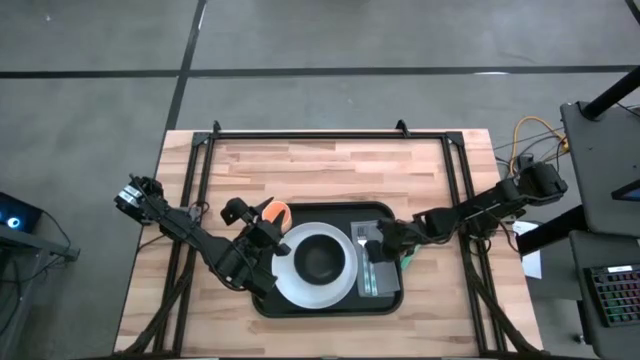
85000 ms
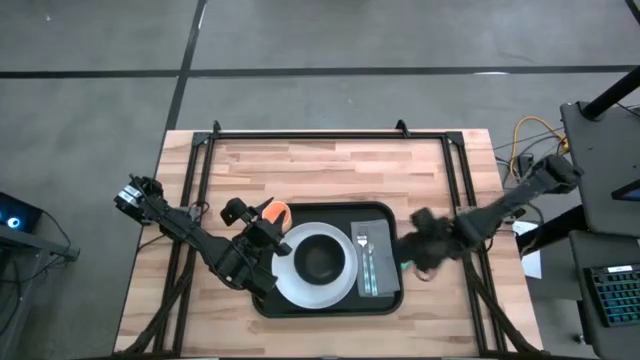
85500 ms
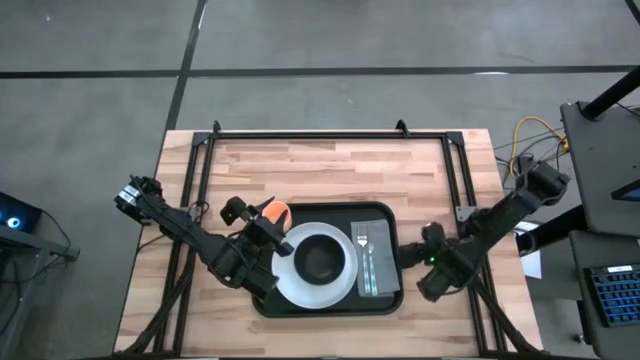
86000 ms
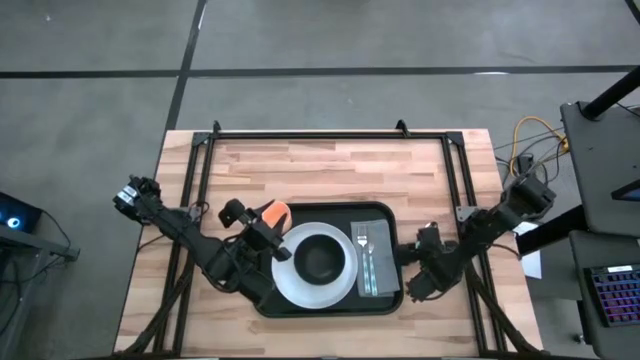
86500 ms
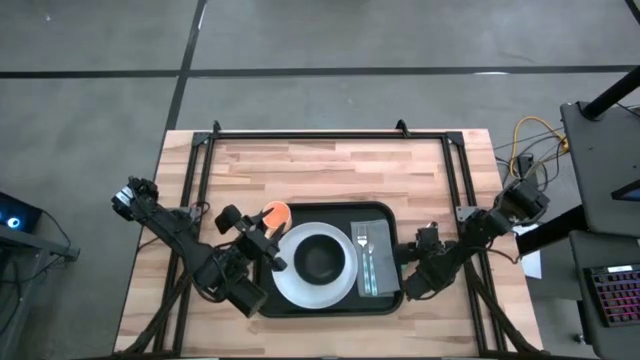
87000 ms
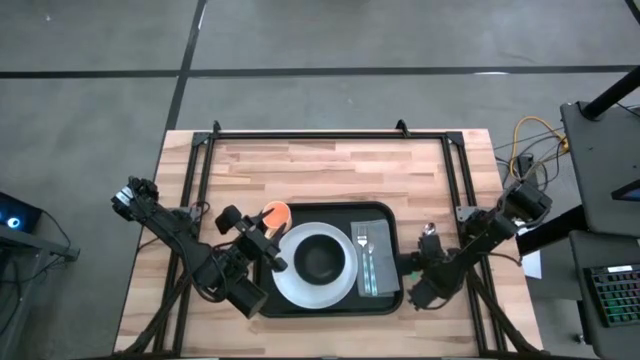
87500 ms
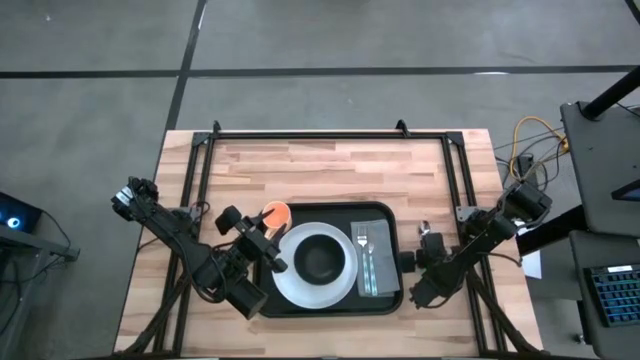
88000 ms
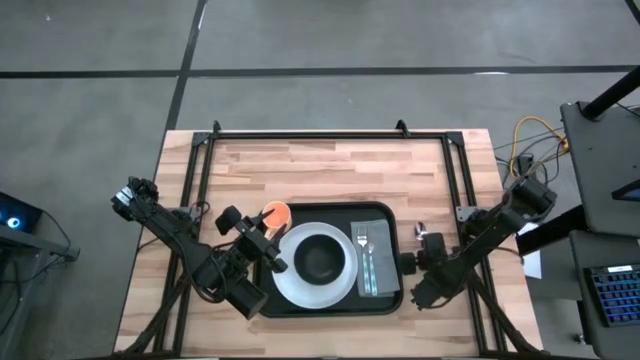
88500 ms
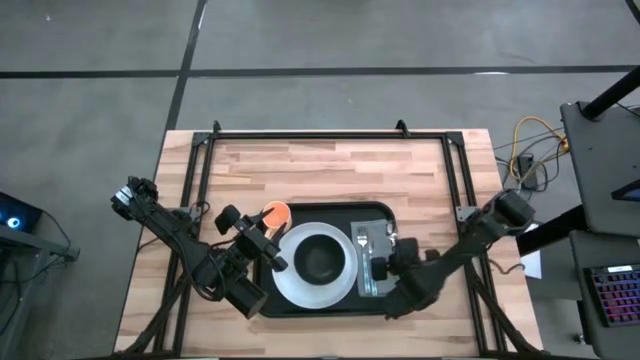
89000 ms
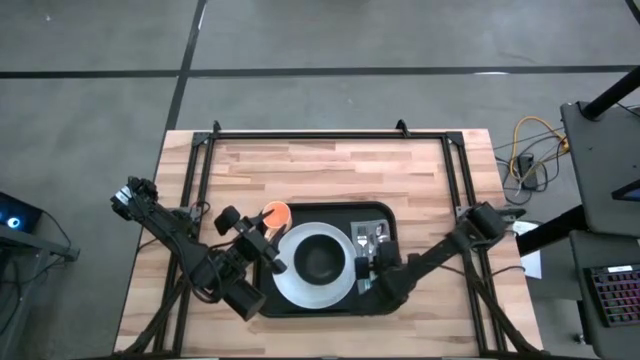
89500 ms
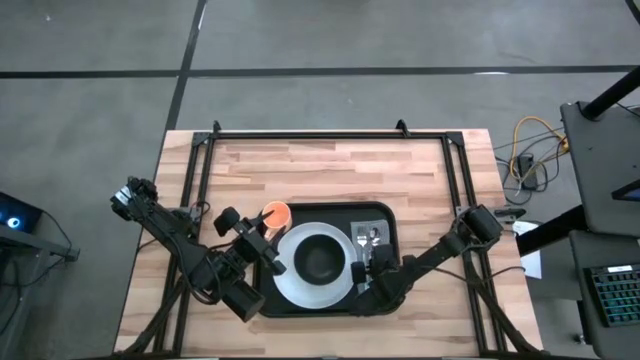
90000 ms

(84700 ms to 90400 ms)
Task: Set up tray
Put the green spoon to the right of the green knife on the gray napkin

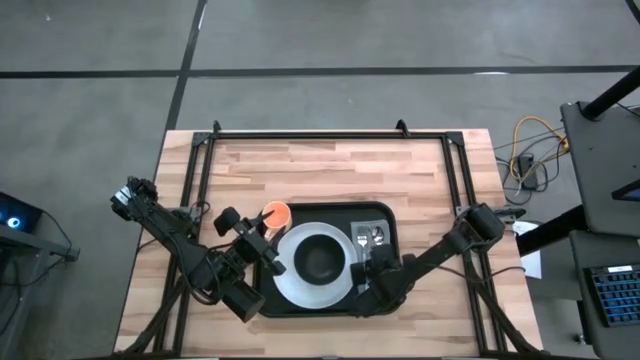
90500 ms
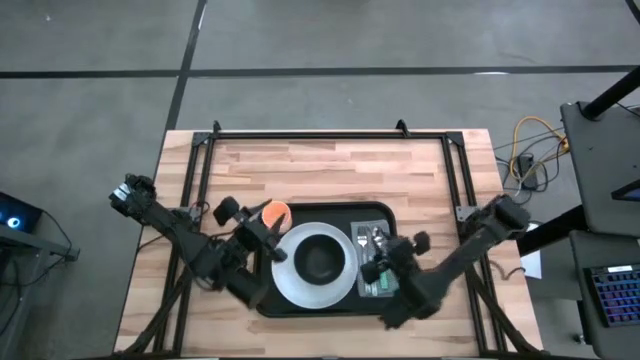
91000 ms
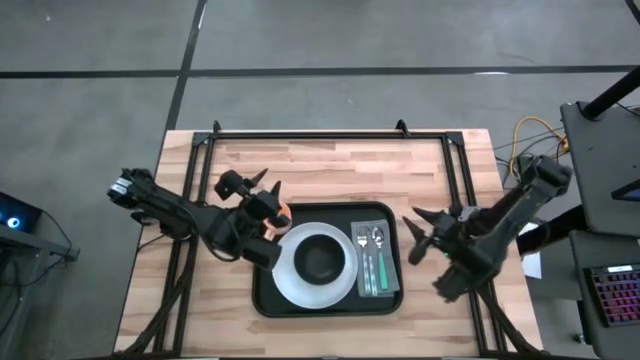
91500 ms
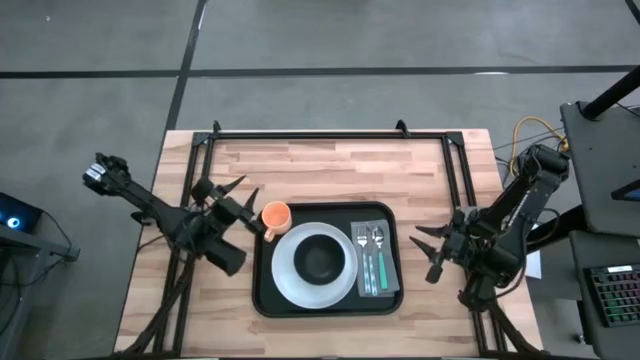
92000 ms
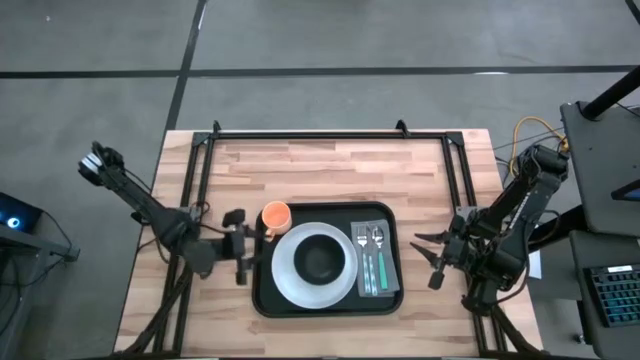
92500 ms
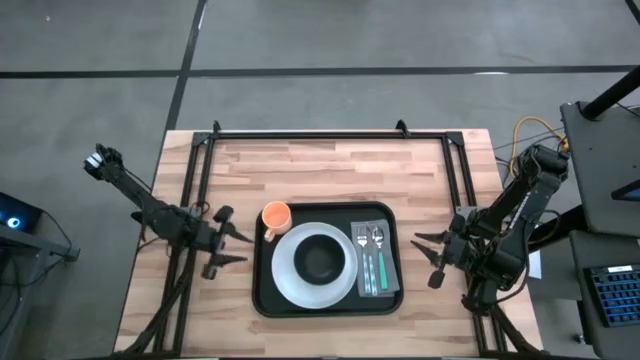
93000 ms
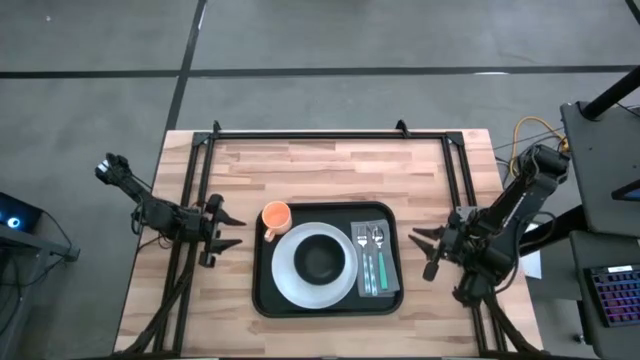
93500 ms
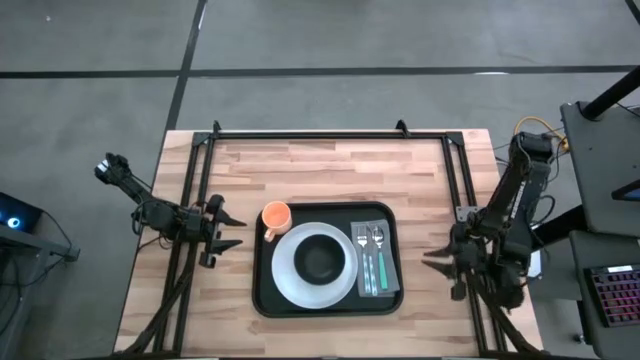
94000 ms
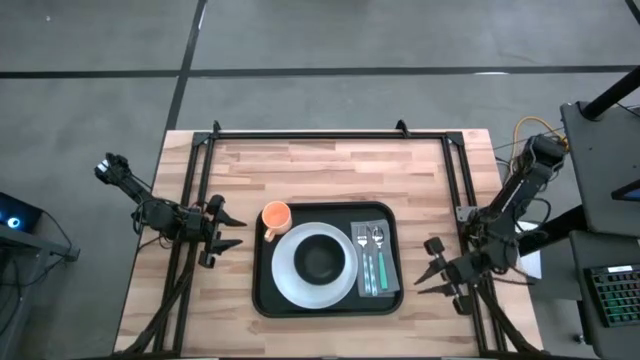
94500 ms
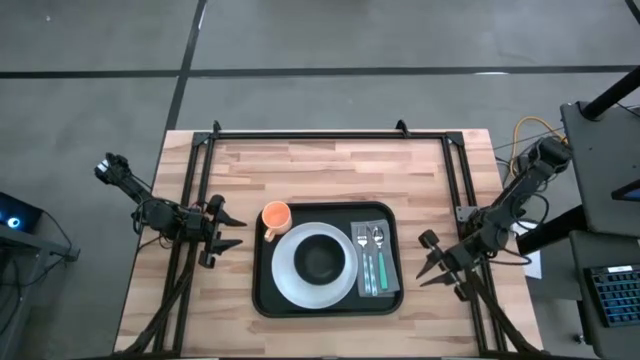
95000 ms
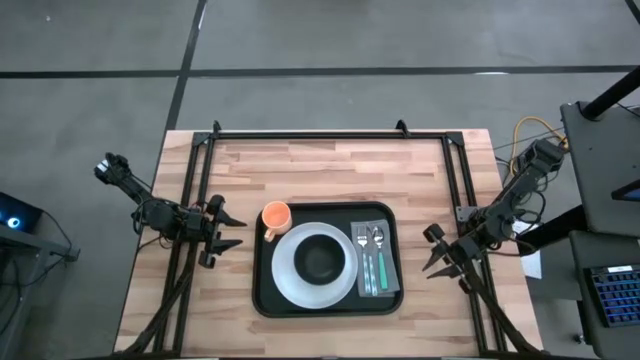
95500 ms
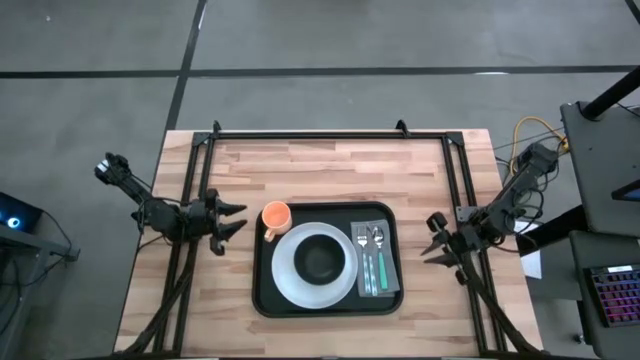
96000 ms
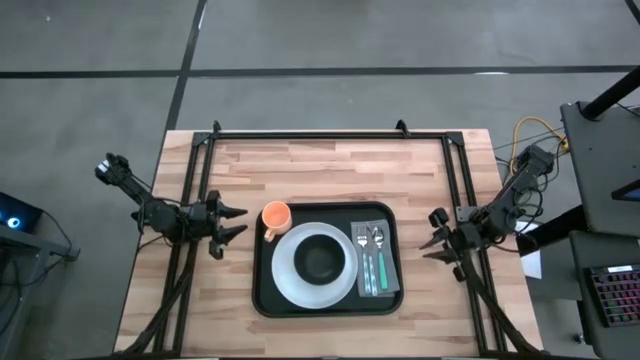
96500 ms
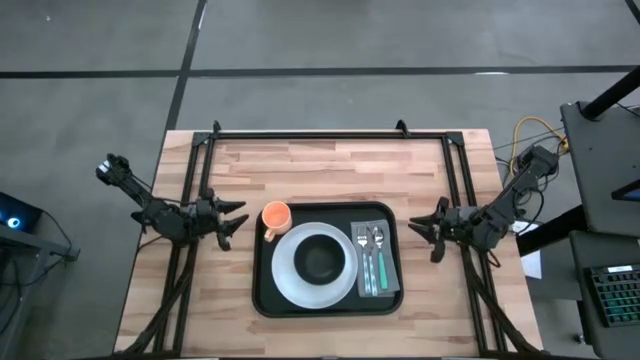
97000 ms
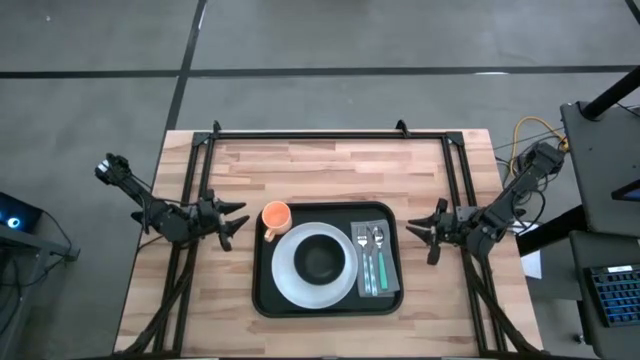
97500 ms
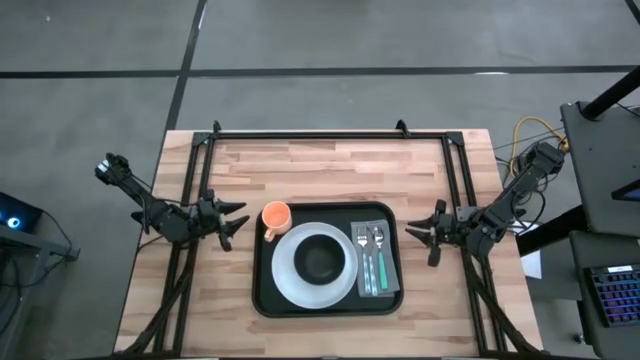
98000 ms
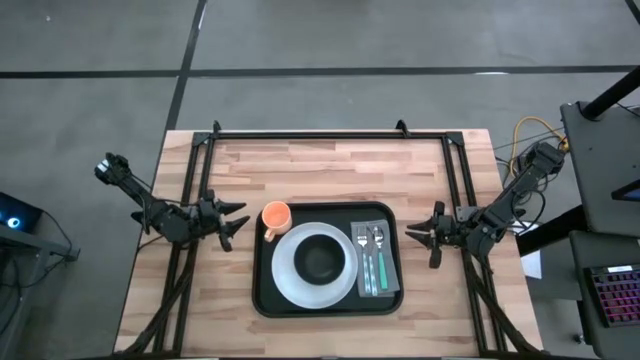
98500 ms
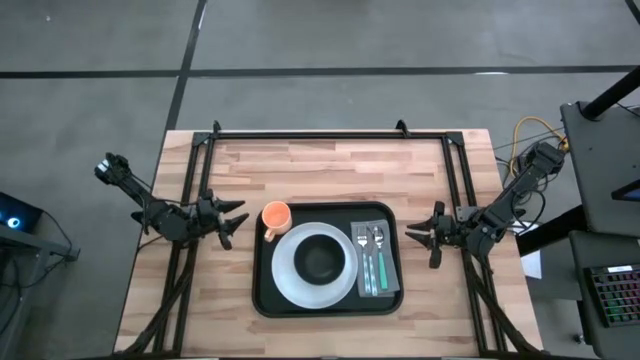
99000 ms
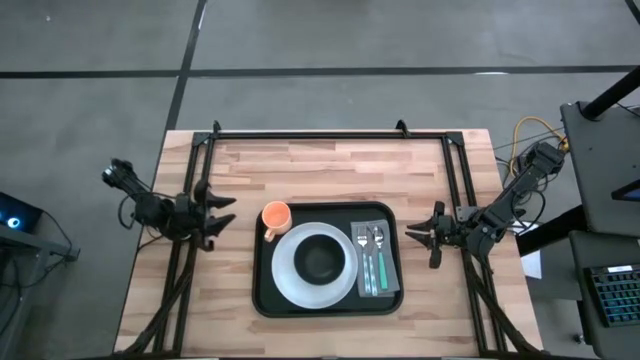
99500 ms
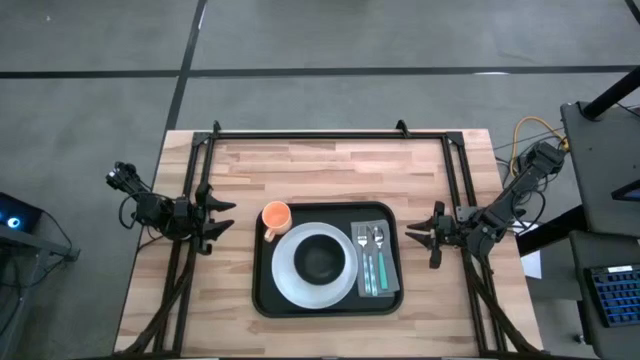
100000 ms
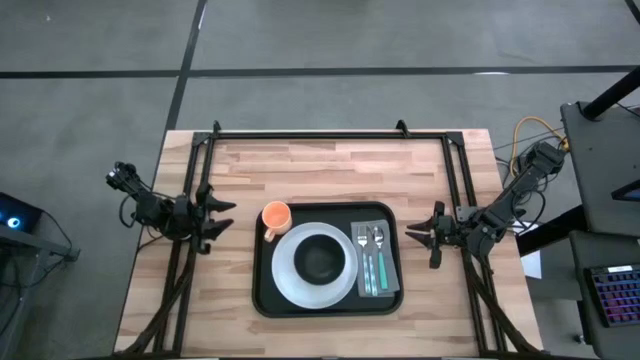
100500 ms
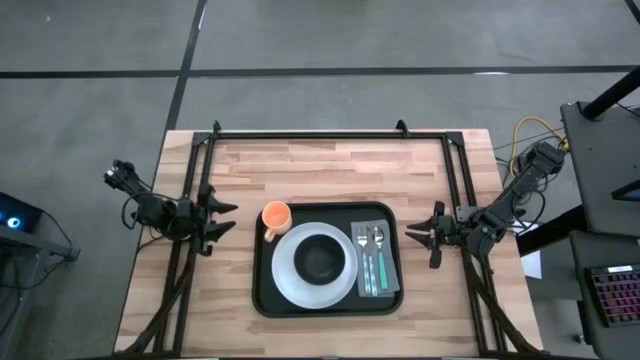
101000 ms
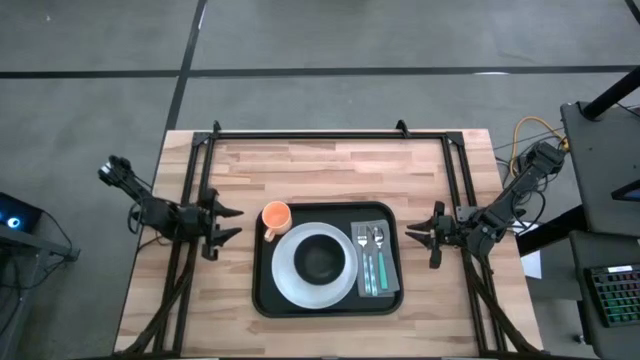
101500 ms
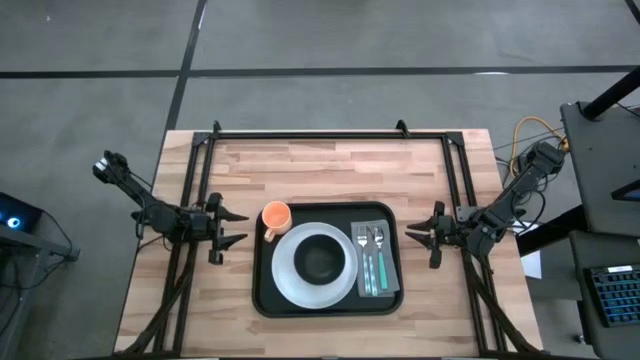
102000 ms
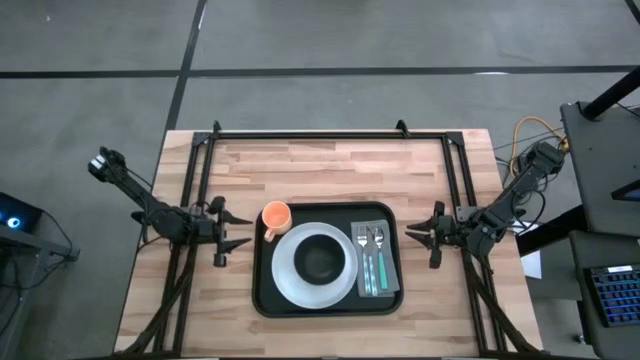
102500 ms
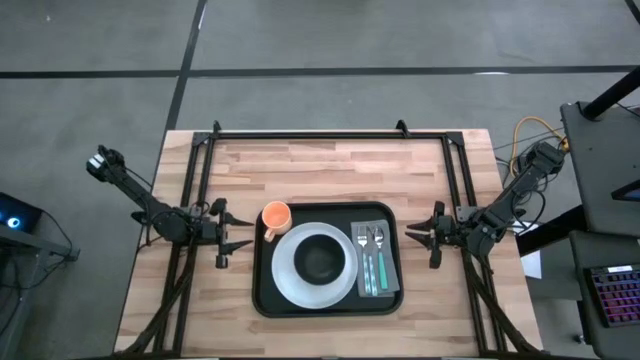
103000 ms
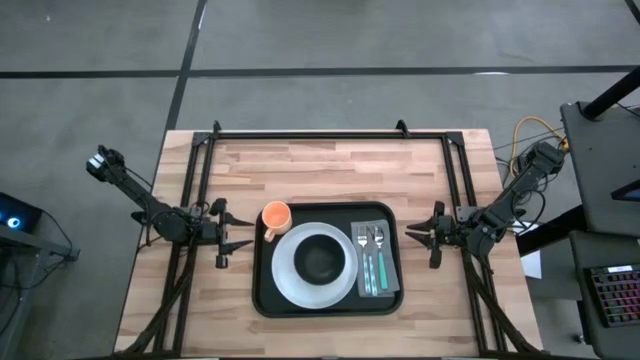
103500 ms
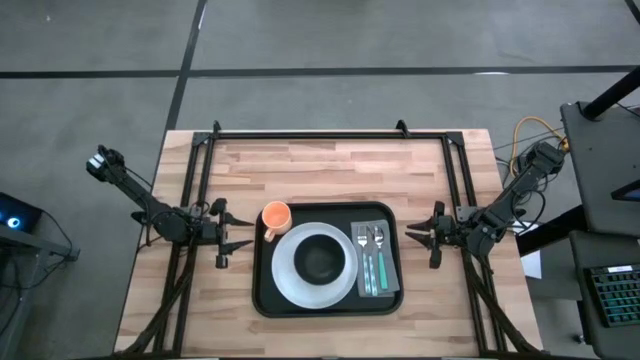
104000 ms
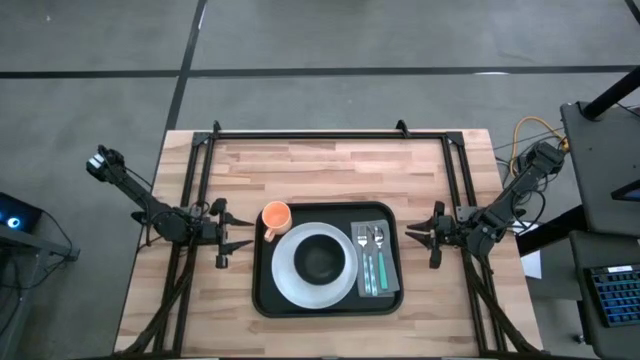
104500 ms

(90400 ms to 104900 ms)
Return to Home Position

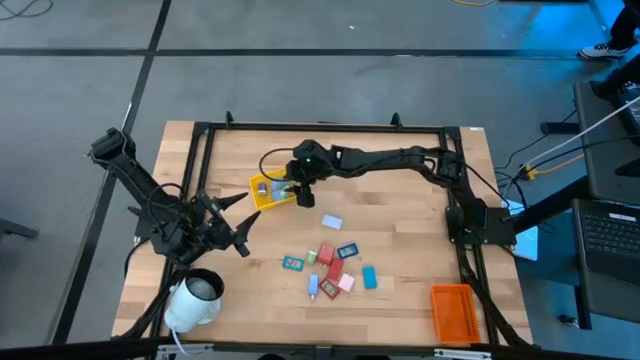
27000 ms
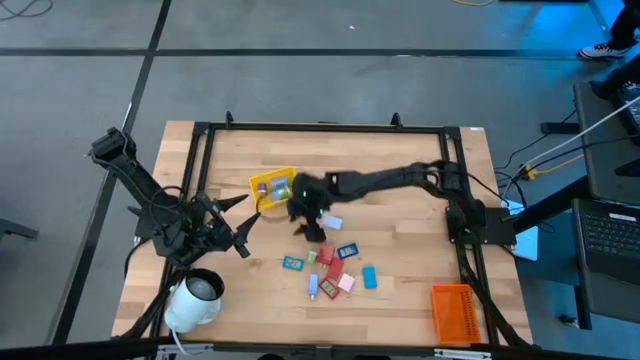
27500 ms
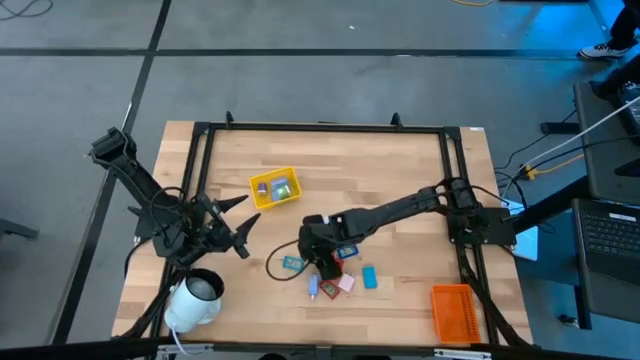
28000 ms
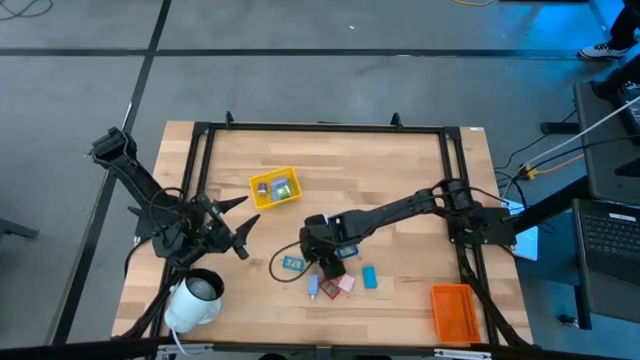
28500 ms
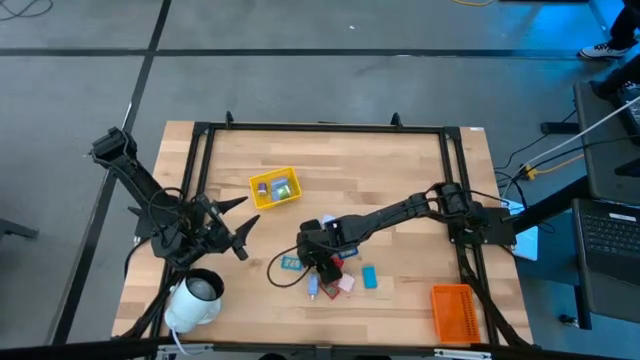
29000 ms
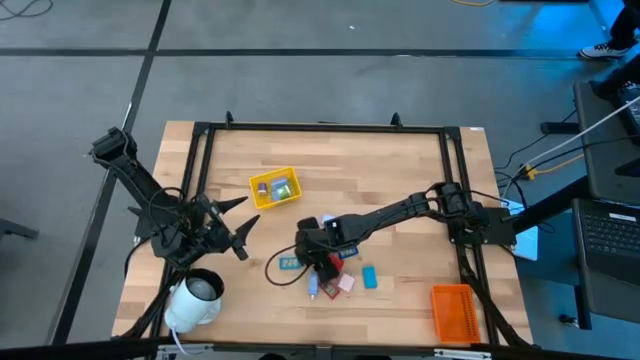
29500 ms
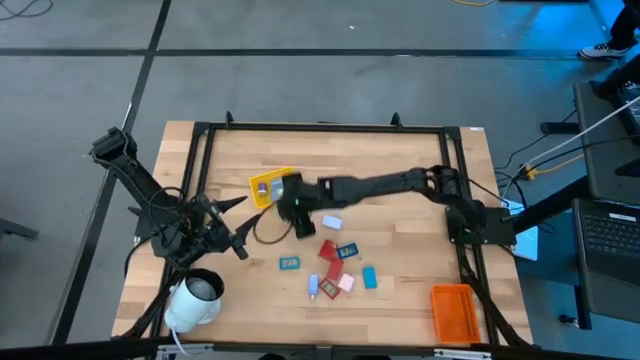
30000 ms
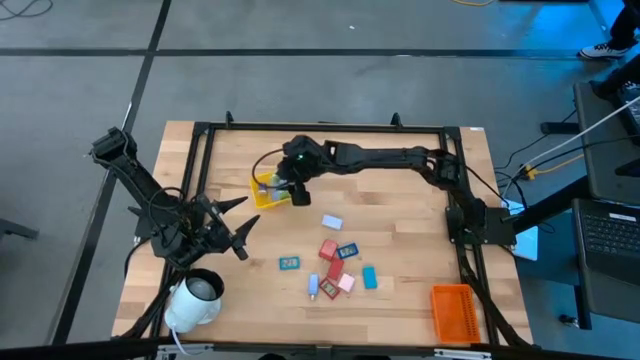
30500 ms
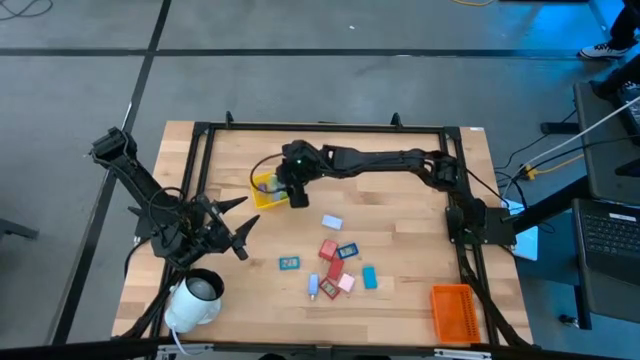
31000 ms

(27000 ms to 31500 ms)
Task: Pick & Place Office items
Put the green charger adapter into the yellow bin
